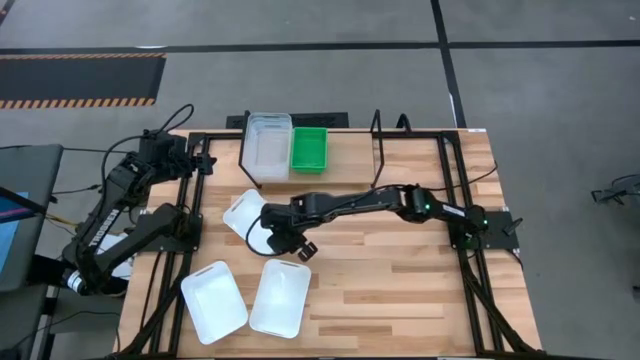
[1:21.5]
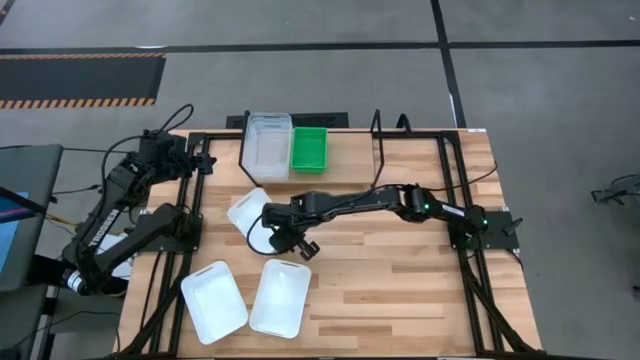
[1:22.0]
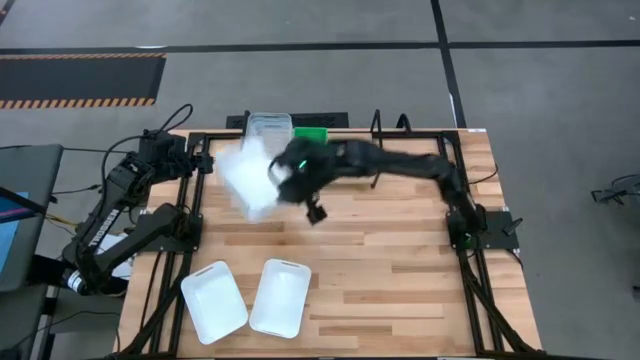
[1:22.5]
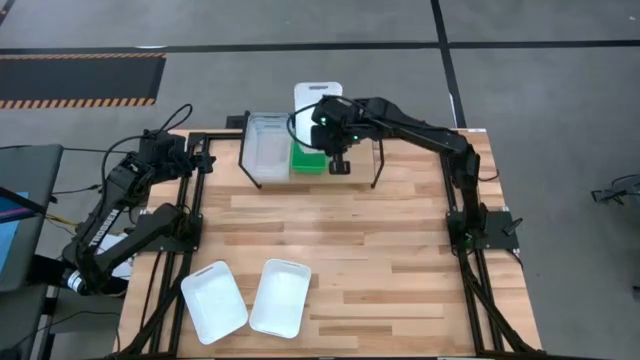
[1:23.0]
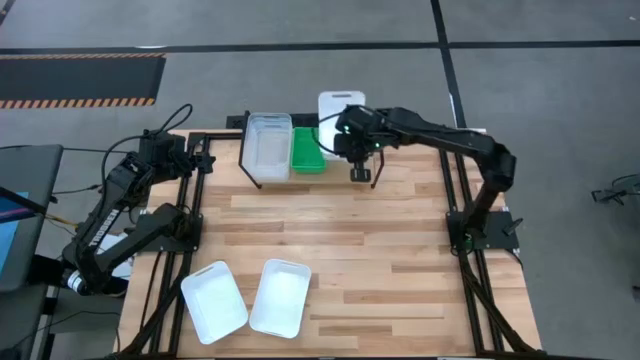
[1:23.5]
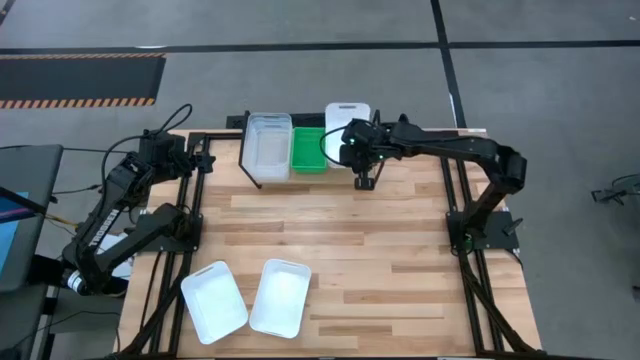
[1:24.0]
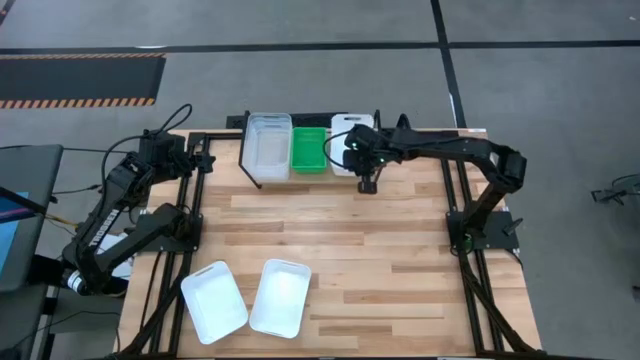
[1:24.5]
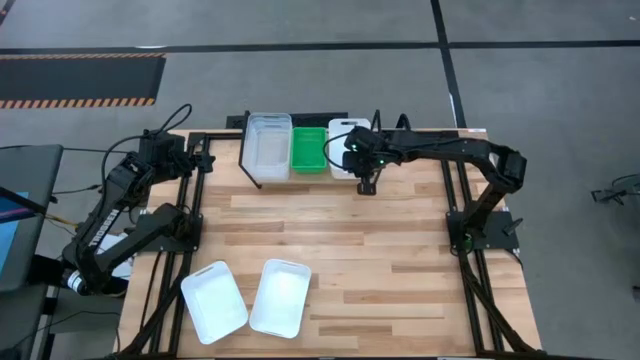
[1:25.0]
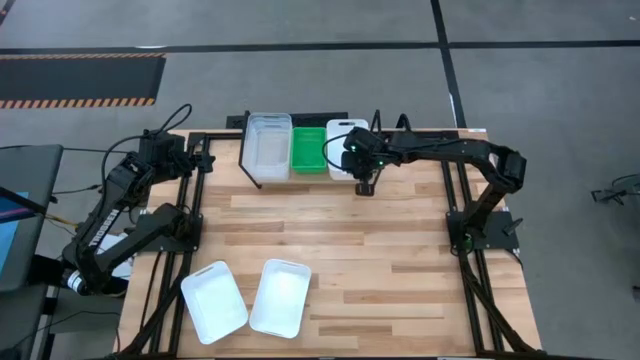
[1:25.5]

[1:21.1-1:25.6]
Task: Stack baskets on shelf by color
Put the top white bin on the shelf

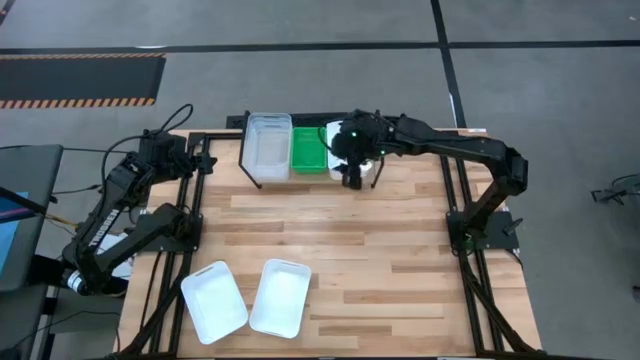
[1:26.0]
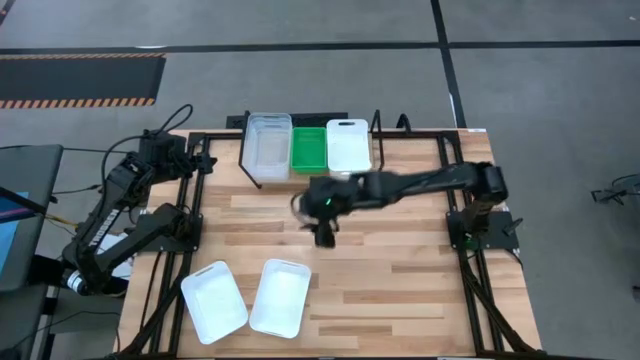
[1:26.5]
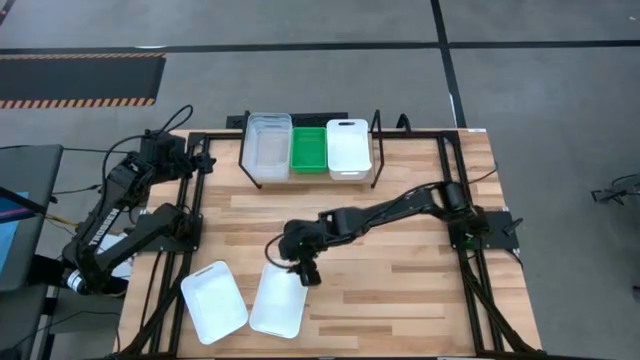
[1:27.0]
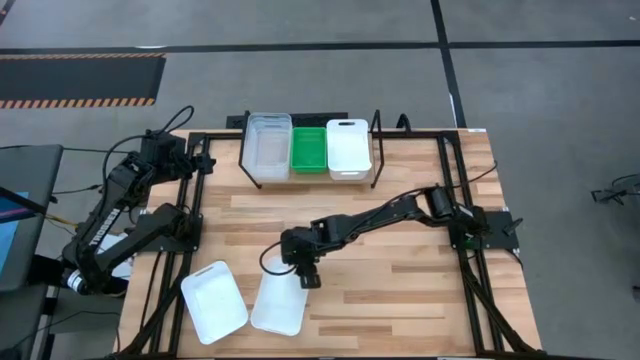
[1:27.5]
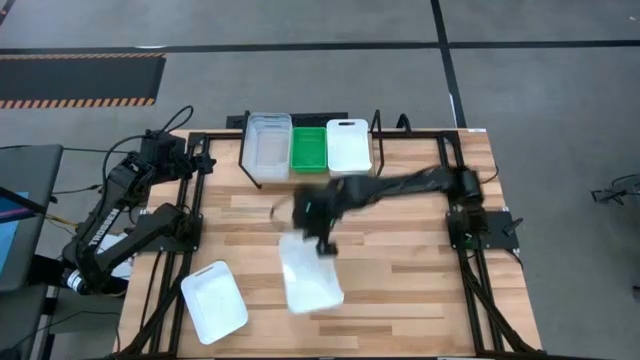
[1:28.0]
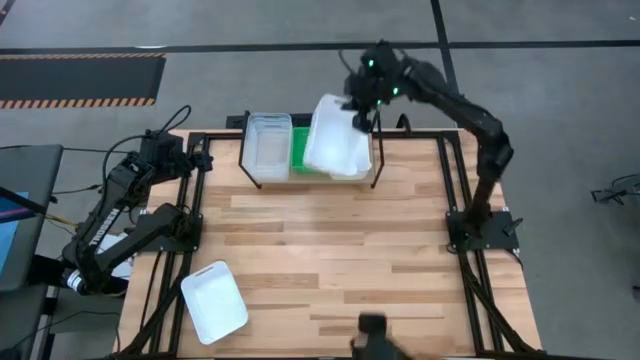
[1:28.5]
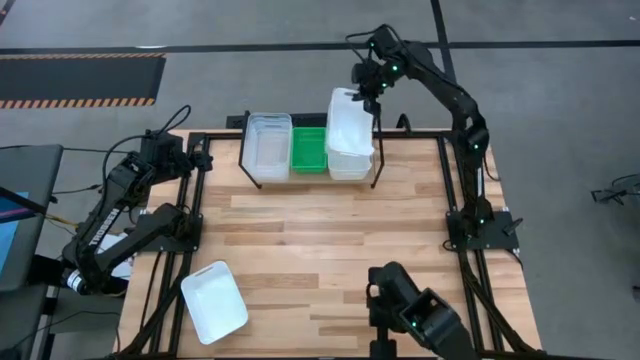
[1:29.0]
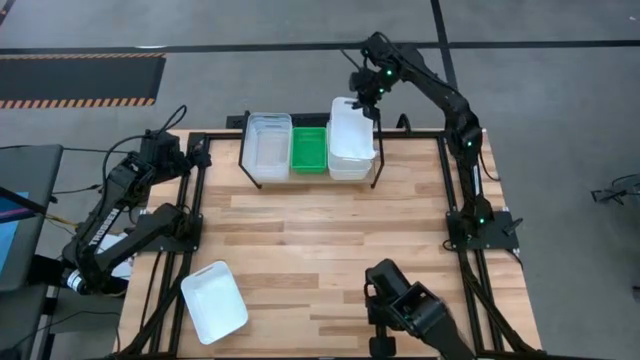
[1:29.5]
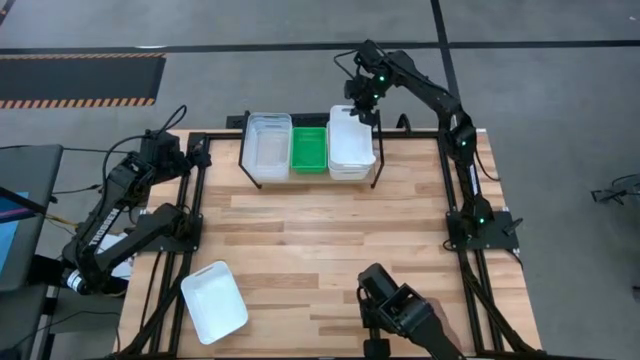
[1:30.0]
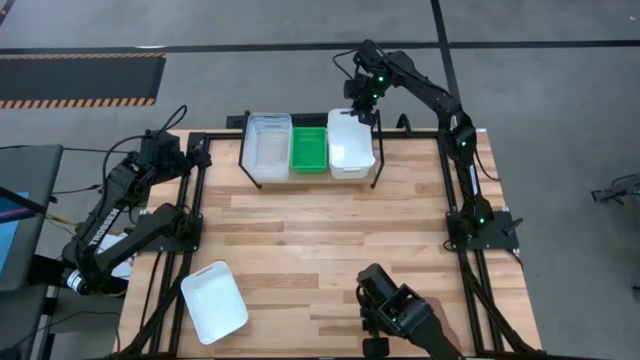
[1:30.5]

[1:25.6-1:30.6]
Stack the right white bin on top of the white bin on the shelf

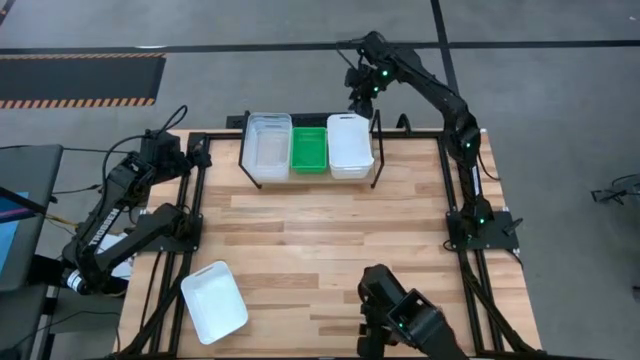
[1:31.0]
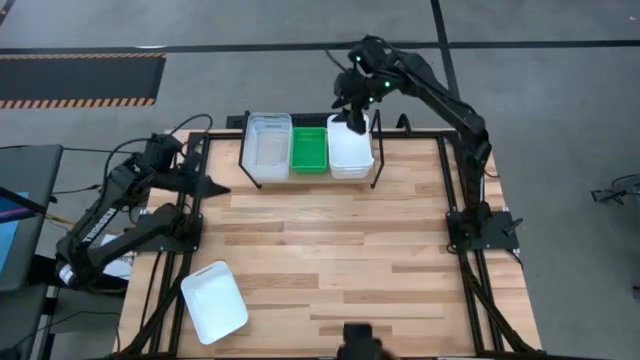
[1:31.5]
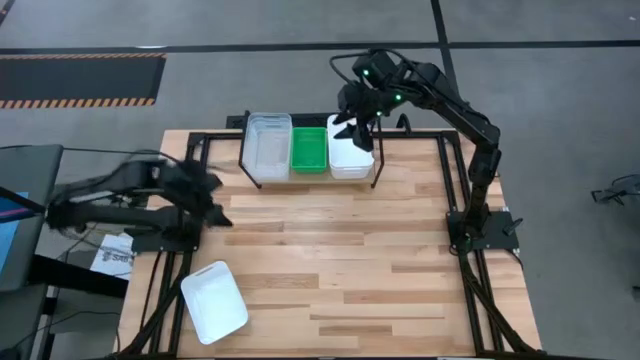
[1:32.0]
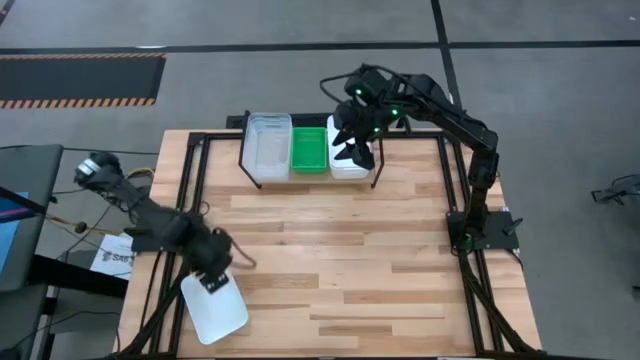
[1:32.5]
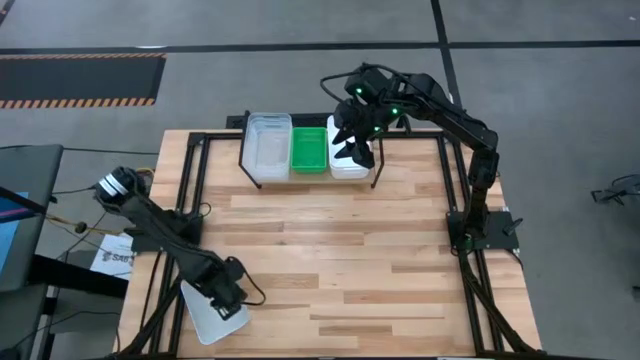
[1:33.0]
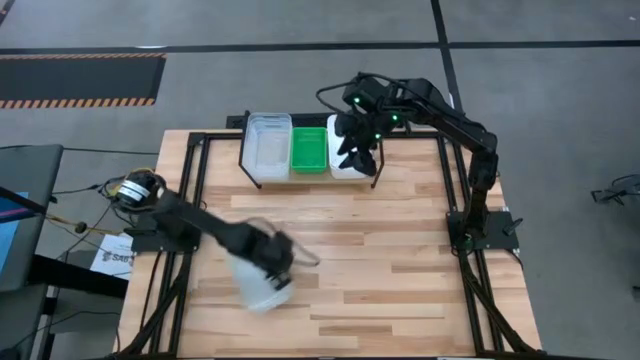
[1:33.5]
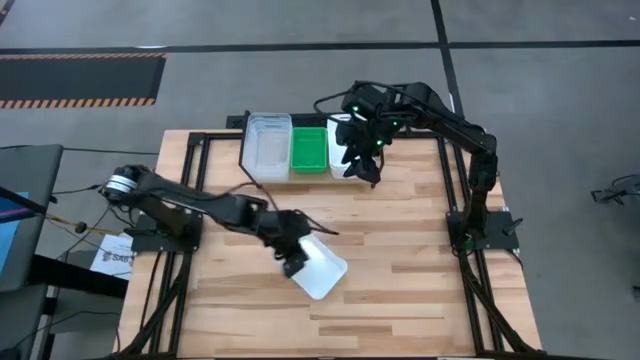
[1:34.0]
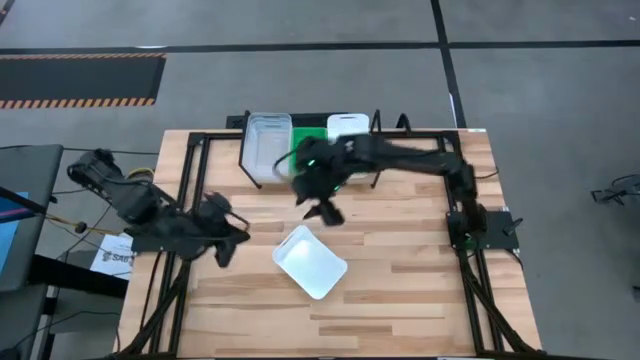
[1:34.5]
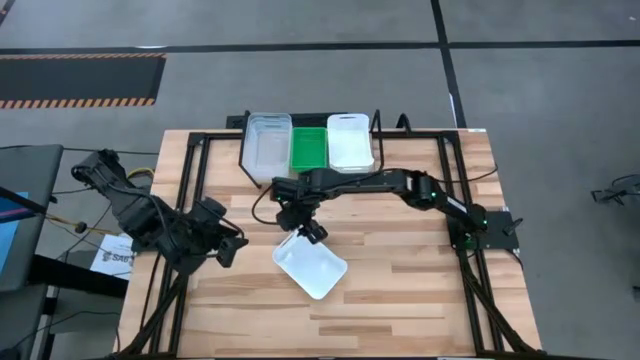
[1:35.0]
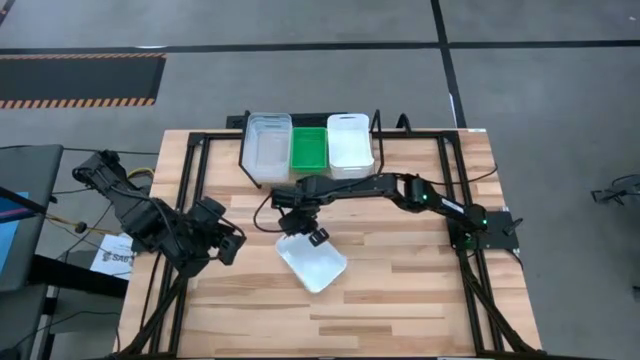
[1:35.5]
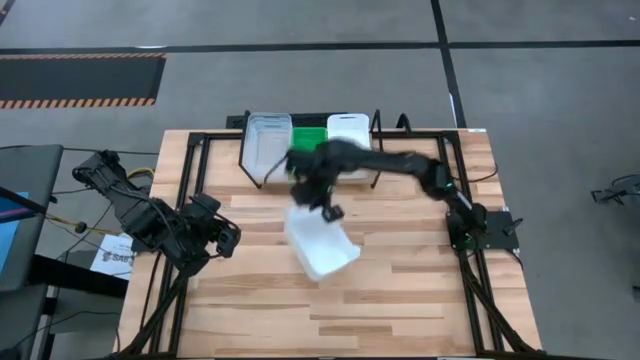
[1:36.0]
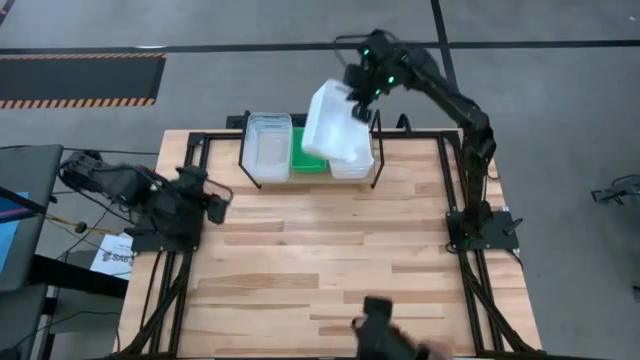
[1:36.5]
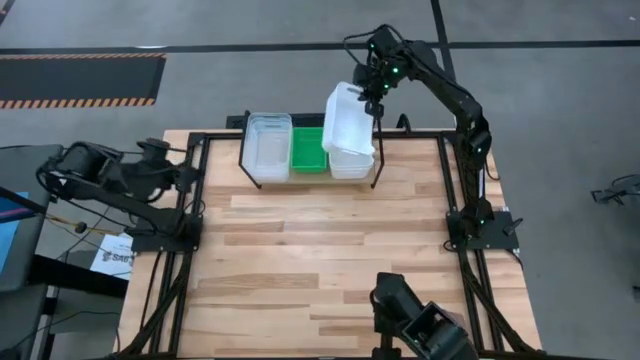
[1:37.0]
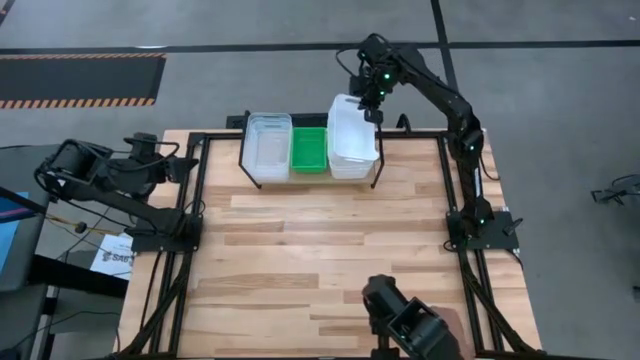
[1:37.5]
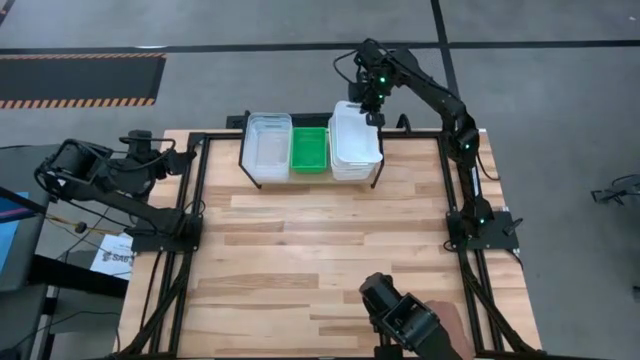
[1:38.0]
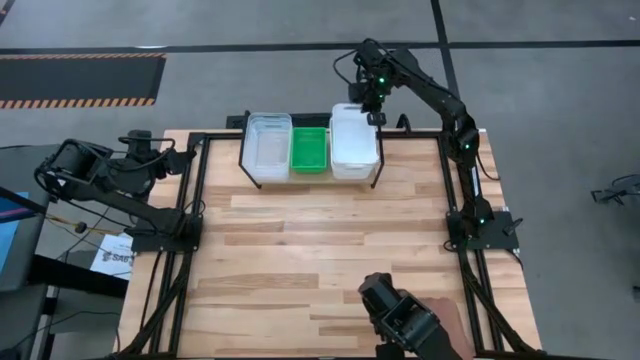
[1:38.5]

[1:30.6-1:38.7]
Stack the white bin on top of the white bins on the shelf

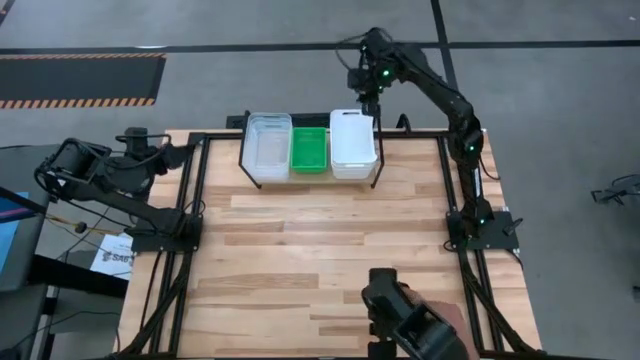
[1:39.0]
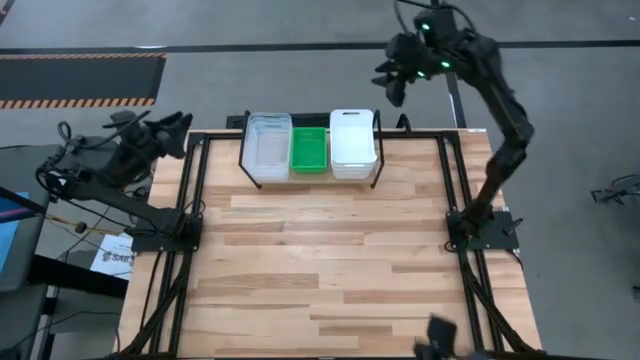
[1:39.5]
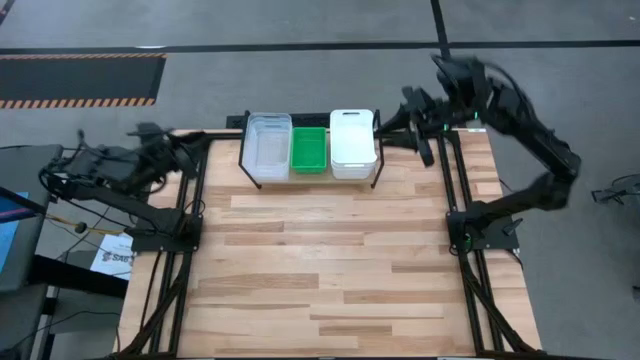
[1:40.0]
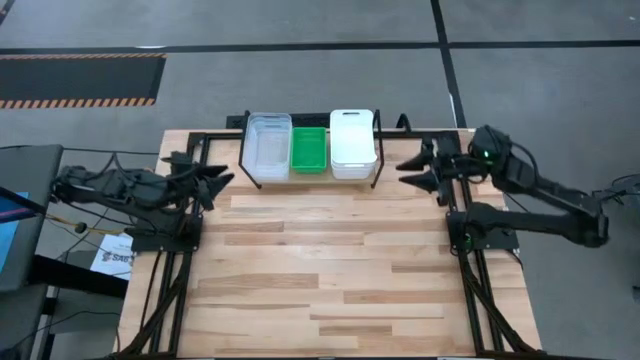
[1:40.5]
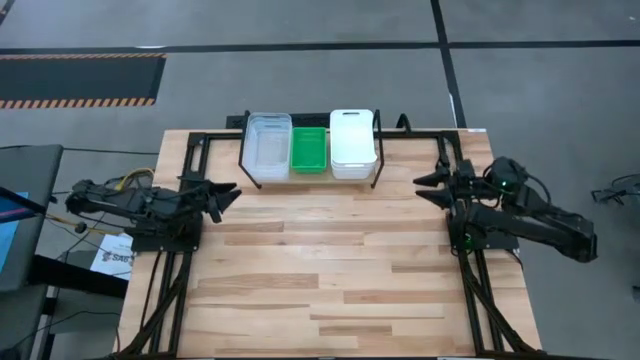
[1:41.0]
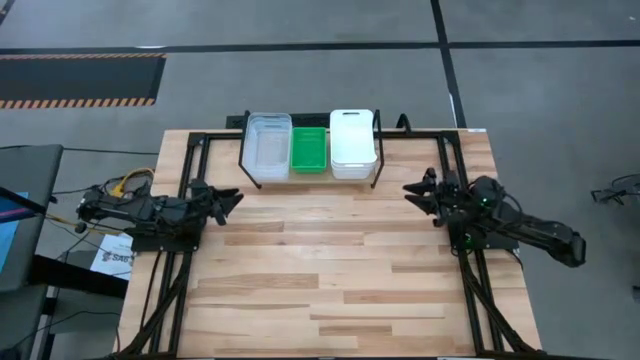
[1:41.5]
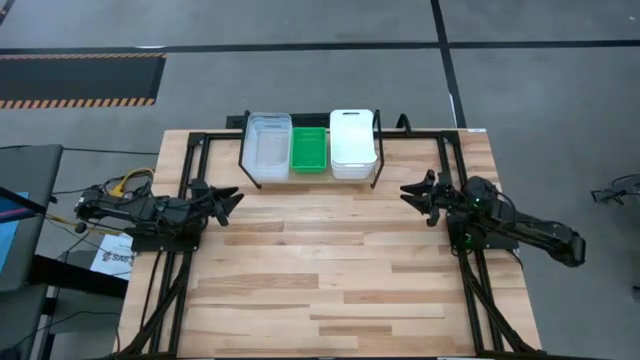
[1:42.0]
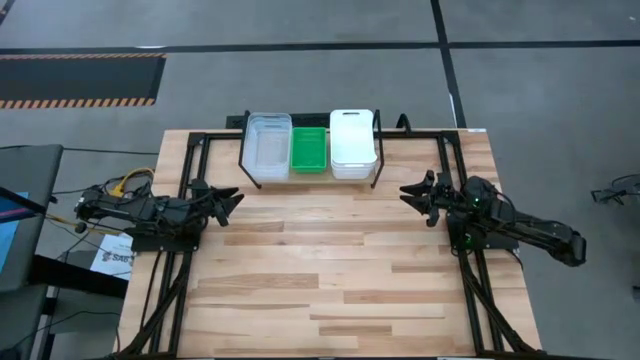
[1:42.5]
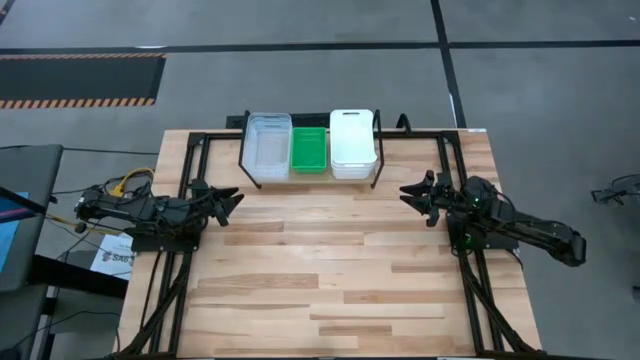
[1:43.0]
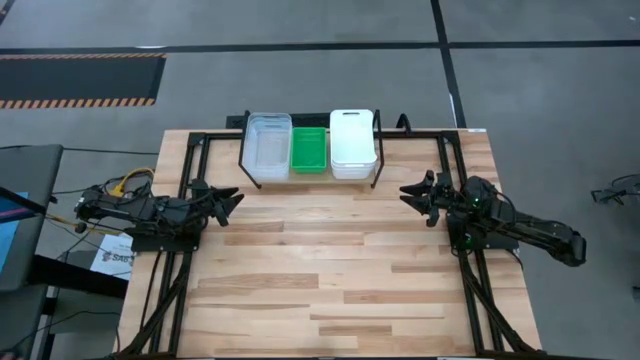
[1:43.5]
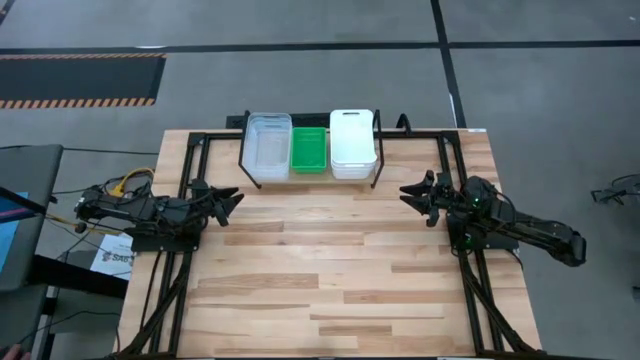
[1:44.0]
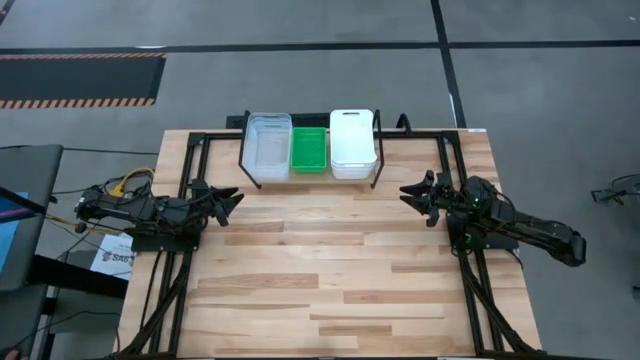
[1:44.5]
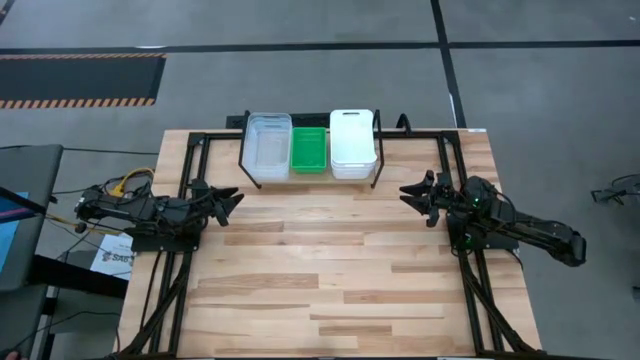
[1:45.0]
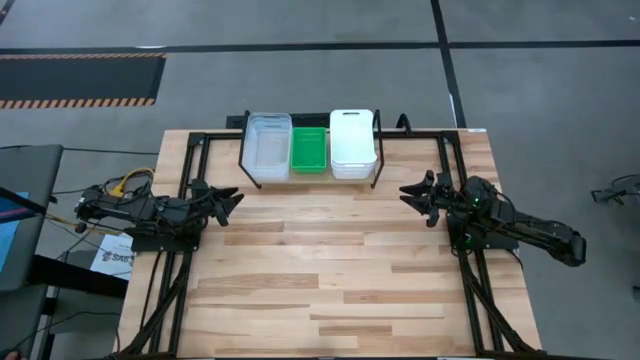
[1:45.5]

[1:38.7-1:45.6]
Return to Home Position
